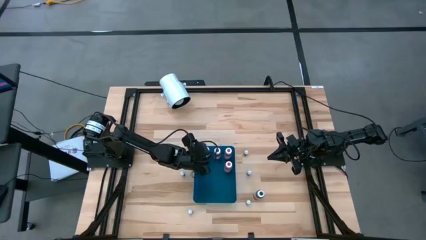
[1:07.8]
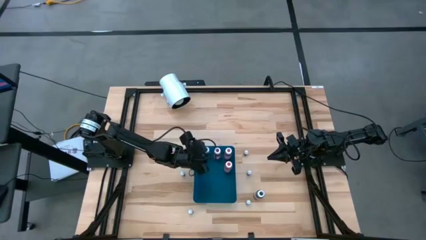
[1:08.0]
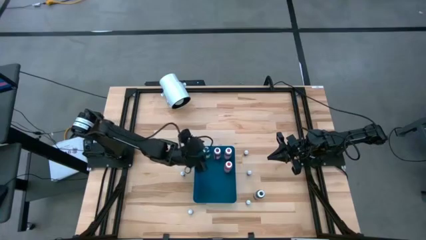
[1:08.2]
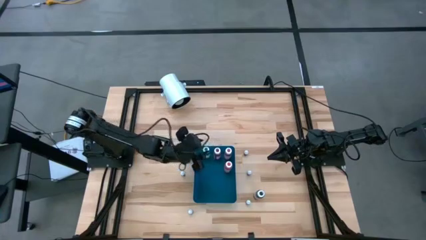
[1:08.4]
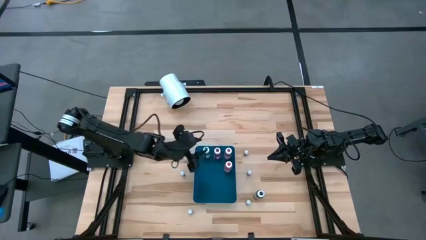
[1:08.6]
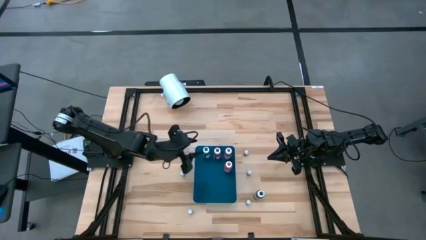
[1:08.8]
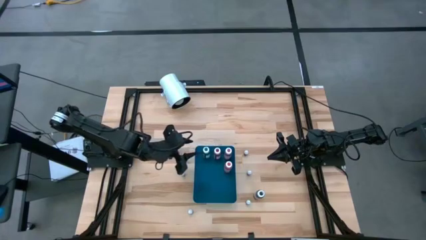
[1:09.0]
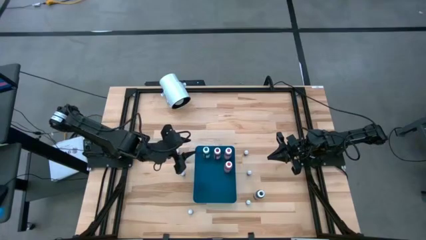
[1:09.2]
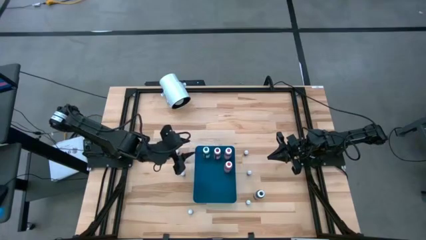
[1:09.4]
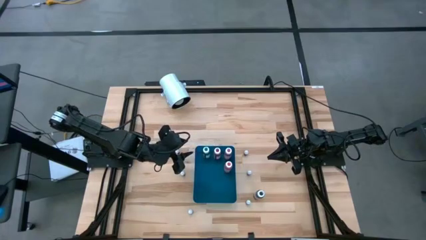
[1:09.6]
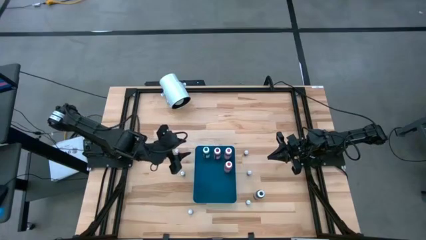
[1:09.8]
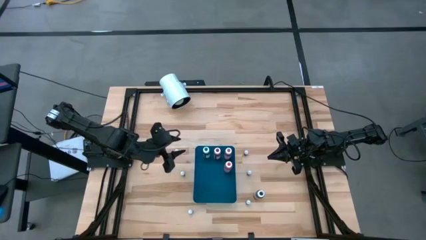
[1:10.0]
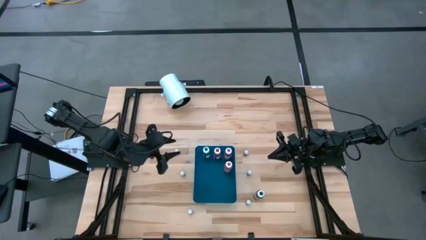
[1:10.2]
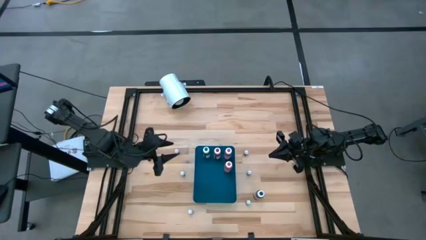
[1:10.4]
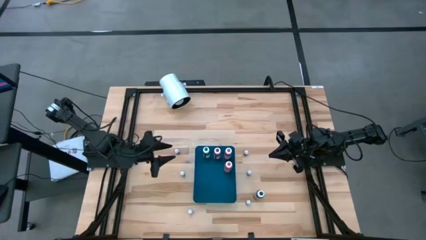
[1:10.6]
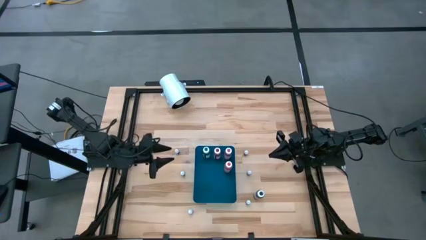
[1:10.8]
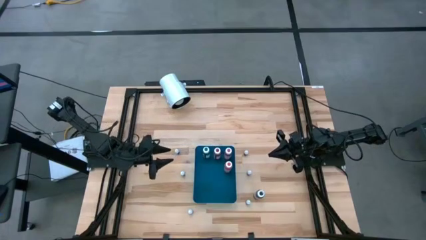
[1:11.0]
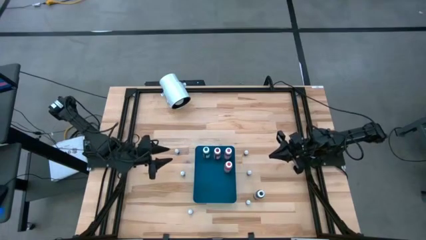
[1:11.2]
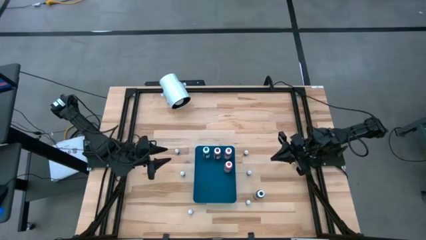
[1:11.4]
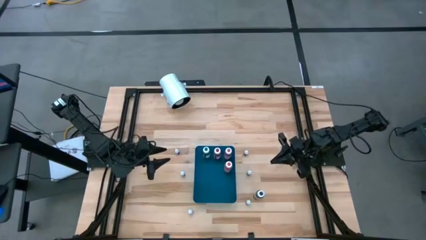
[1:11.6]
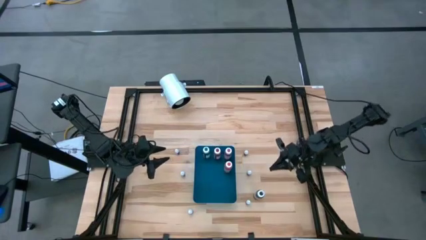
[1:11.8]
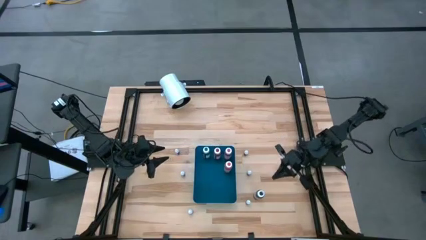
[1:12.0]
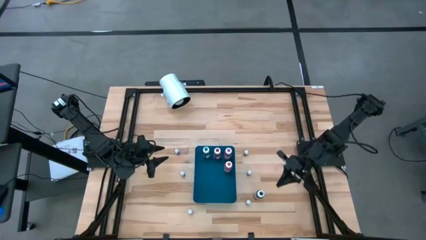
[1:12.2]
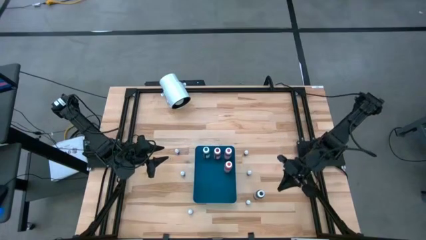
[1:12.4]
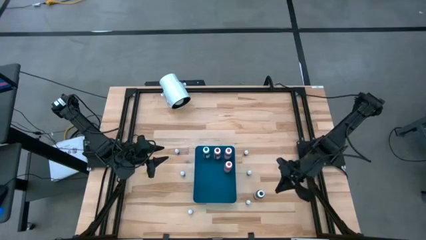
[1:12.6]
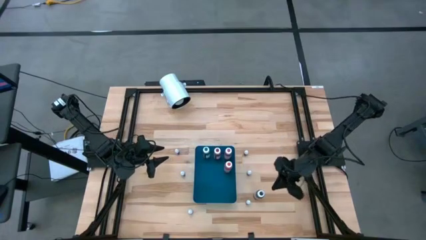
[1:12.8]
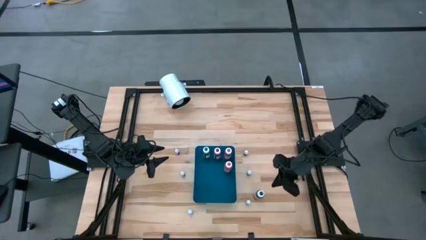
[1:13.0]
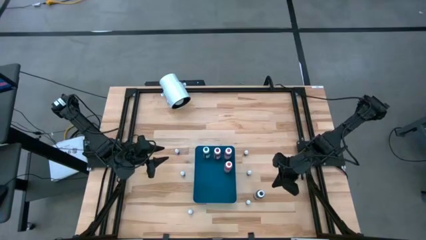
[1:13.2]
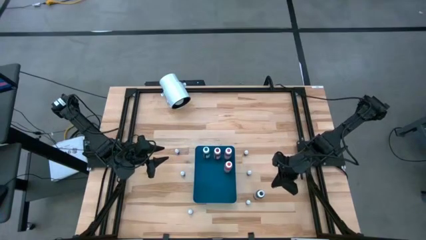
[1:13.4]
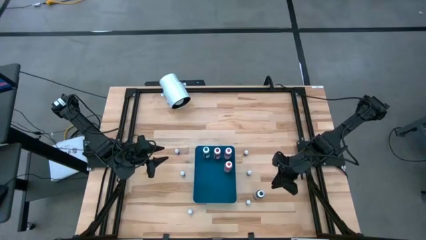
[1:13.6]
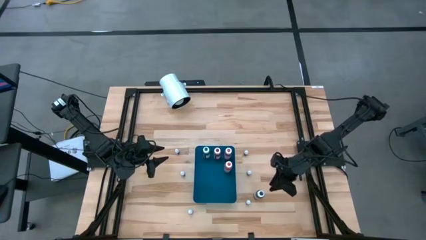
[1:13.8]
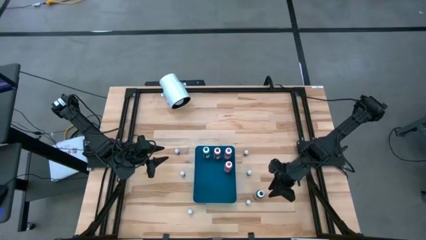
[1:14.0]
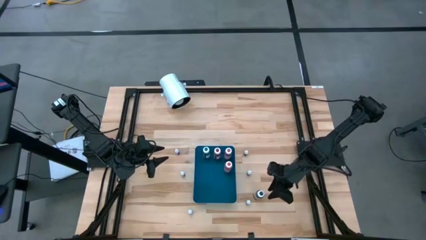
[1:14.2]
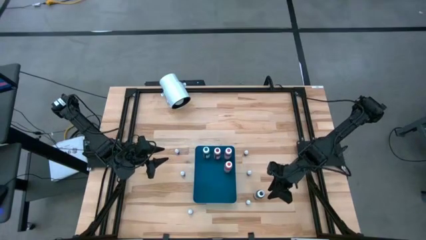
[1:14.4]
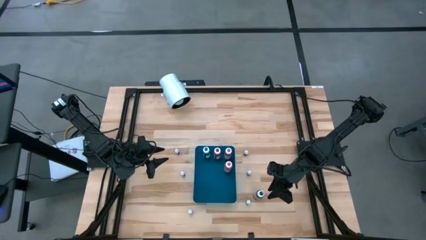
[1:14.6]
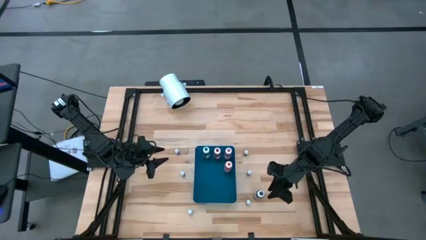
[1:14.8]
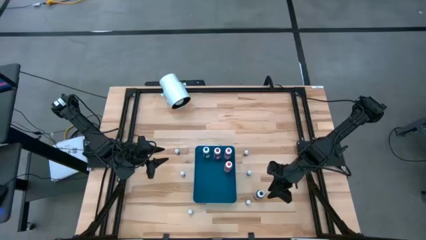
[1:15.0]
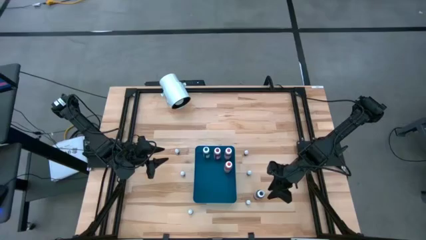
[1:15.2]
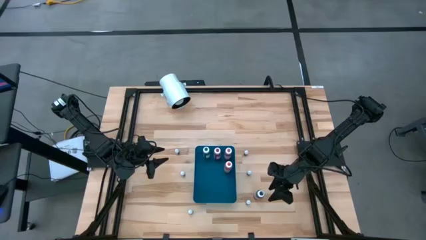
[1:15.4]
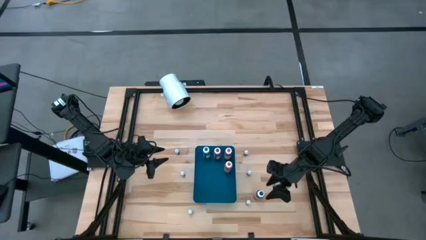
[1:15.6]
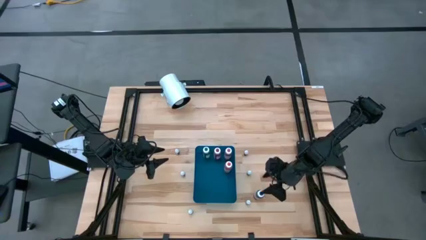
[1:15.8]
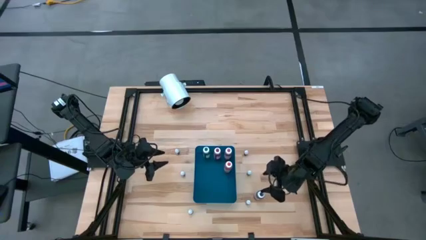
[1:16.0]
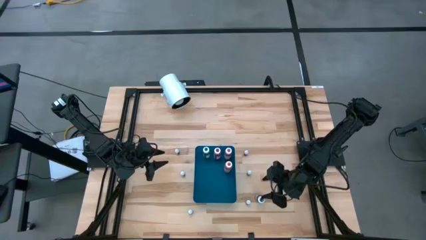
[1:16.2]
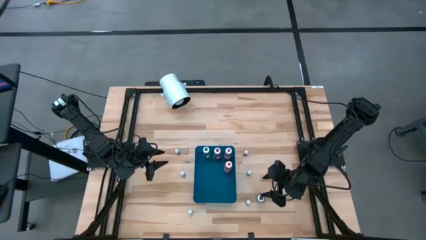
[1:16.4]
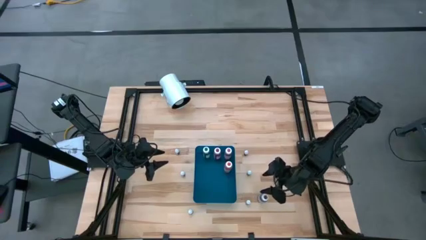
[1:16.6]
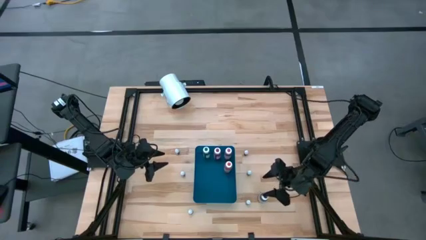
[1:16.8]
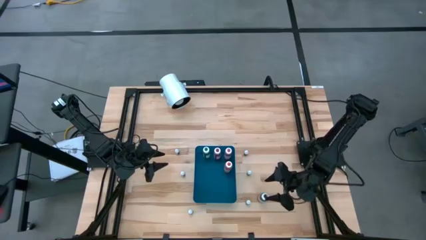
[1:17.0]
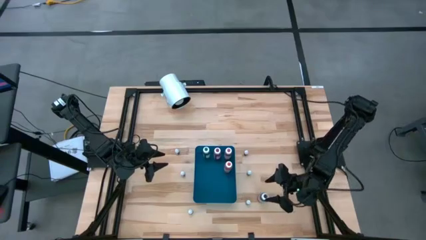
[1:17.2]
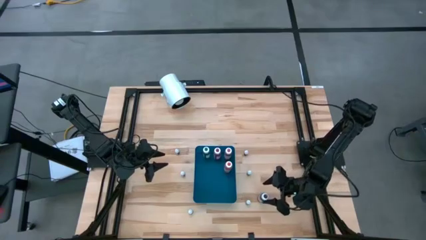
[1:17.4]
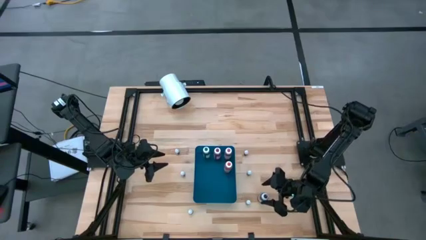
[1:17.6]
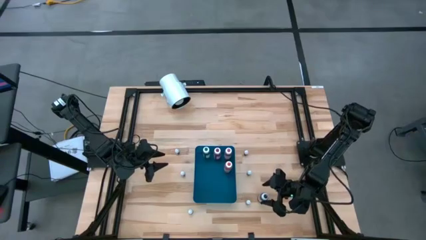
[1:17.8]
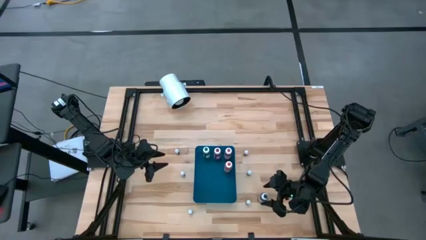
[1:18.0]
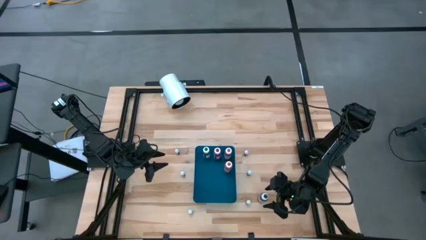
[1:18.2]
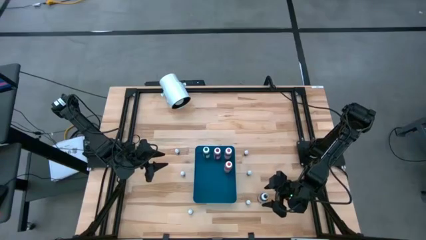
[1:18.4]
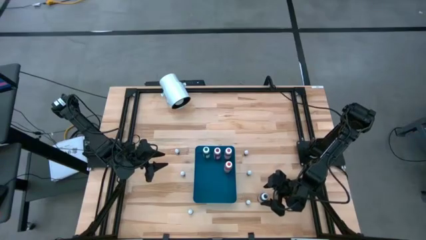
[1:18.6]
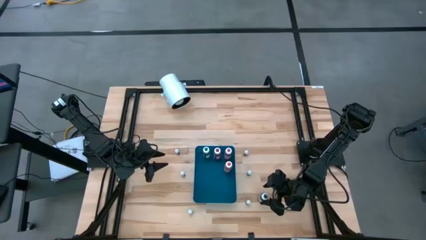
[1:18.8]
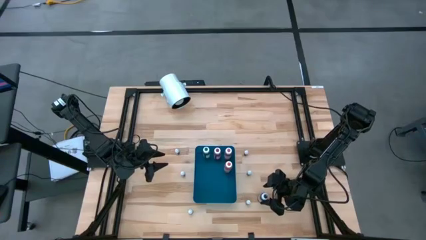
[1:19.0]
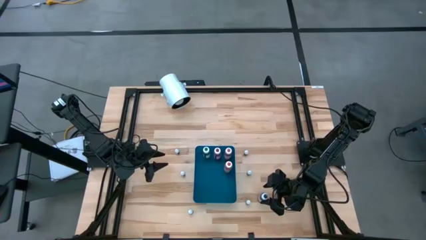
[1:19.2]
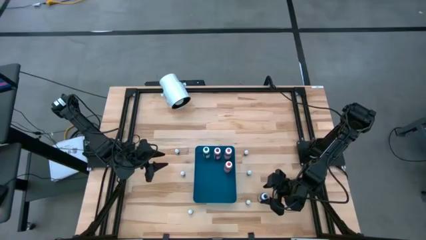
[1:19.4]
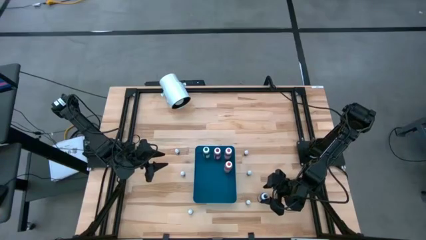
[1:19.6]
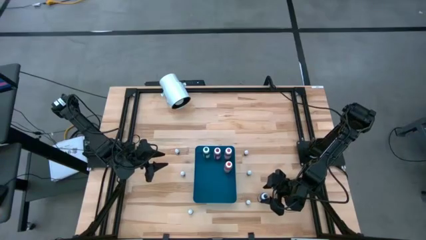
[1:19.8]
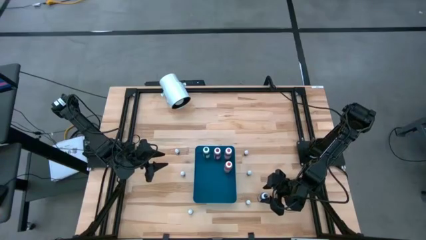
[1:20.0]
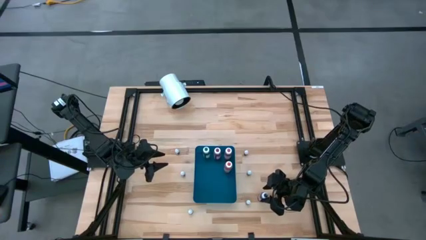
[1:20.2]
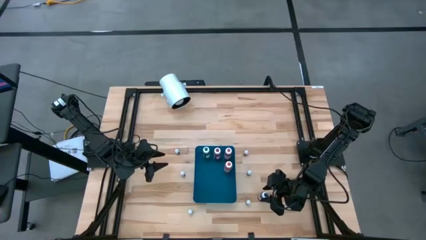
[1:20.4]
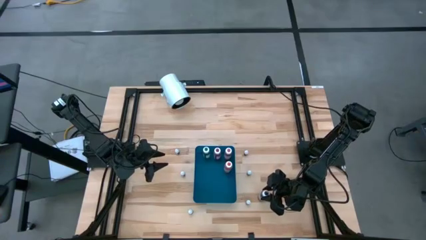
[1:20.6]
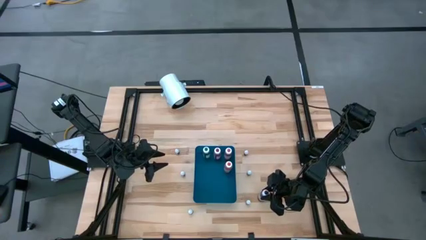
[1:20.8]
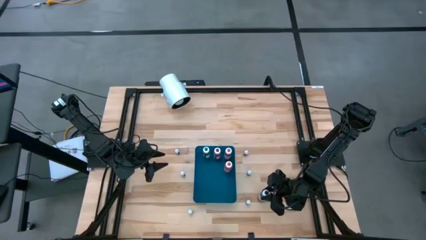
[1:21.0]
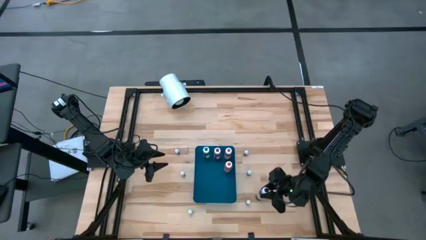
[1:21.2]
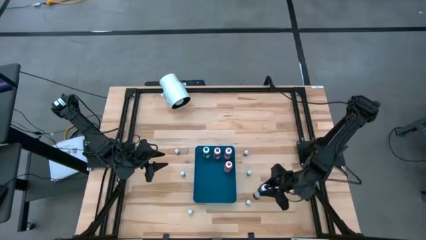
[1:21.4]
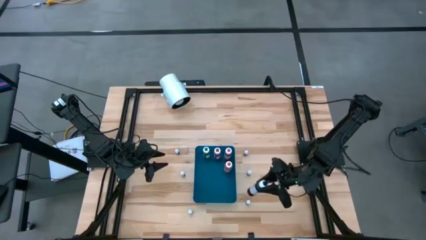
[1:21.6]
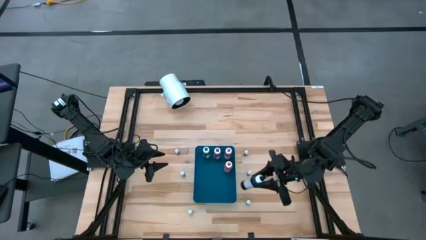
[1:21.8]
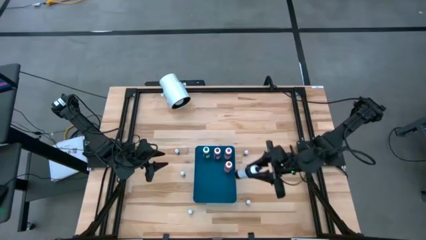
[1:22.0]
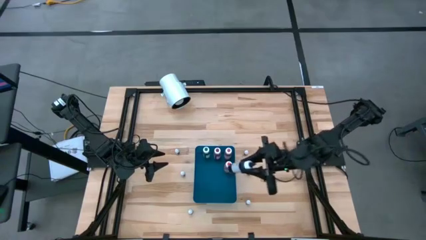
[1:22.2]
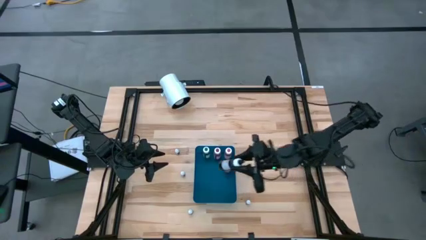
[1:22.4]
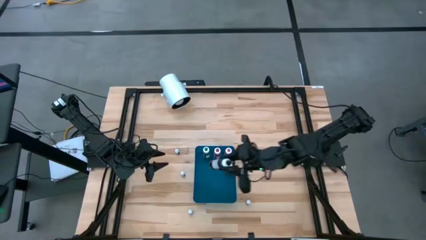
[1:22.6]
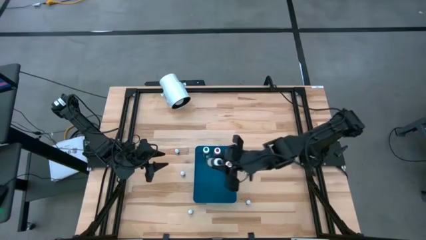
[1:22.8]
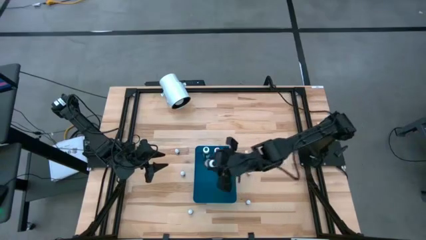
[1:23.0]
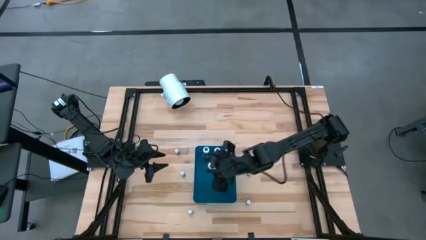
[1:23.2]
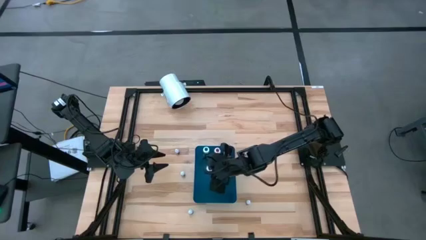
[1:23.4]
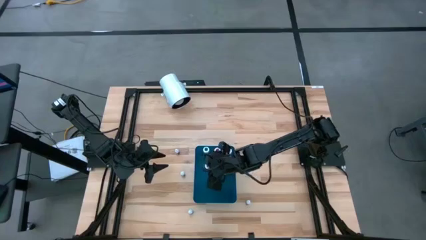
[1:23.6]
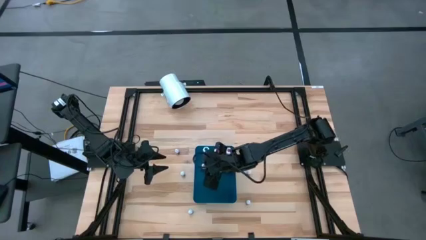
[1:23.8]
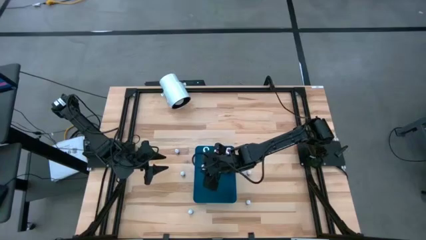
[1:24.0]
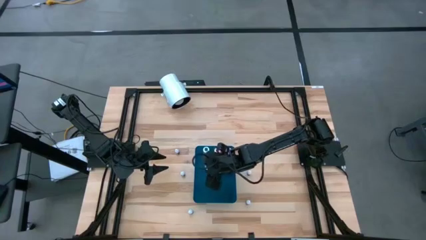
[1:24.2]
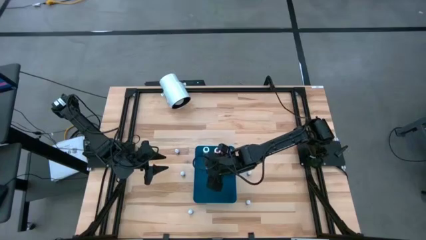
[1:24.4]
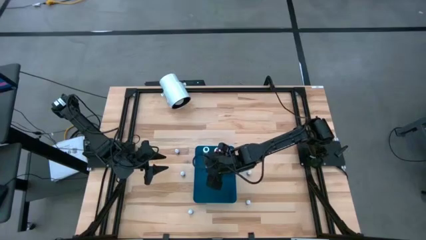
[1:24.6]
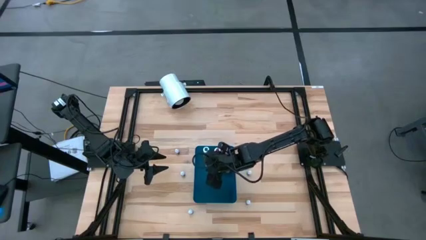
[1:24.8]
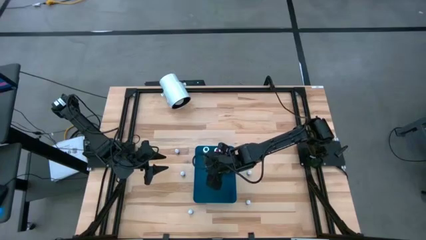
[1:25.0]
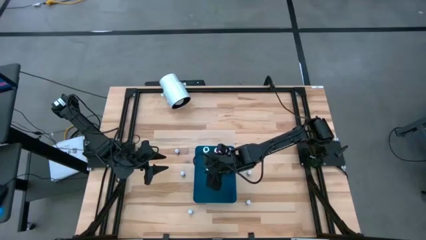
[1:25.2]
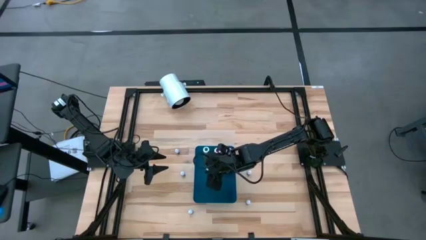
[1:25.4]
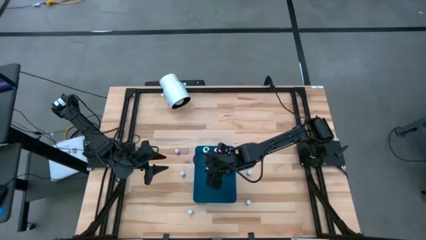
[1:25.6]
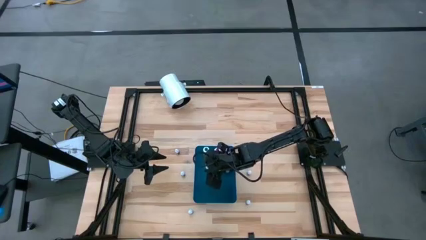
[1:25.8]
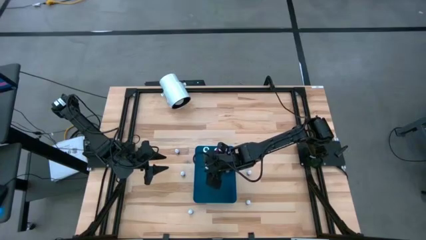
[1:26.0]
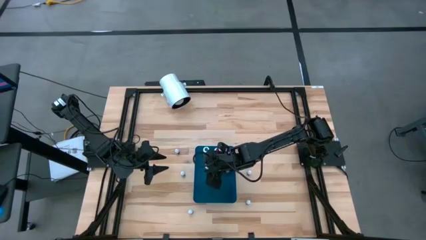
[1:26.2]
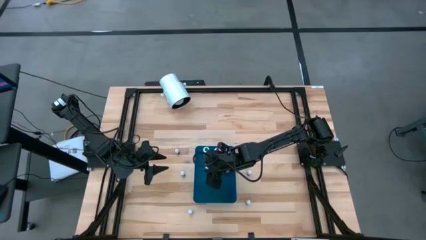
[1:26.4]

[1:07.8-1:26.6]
Task: Pick & Place food coloring
Put the big black food coloring bottle into the blue container
